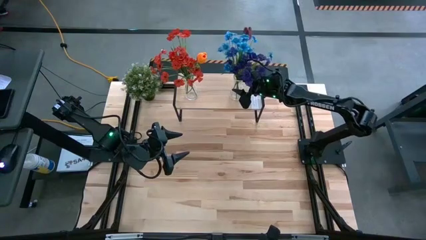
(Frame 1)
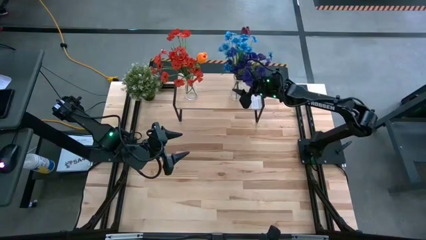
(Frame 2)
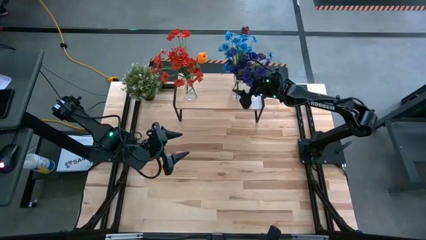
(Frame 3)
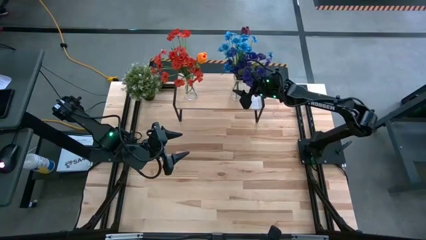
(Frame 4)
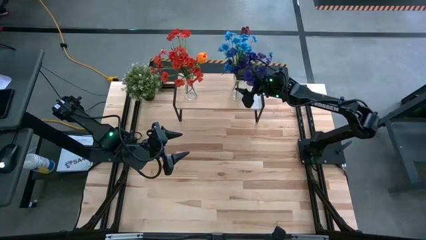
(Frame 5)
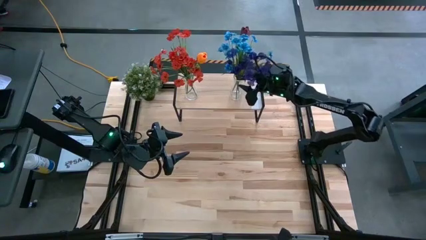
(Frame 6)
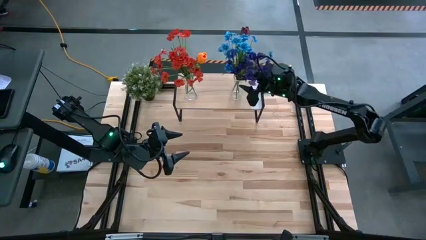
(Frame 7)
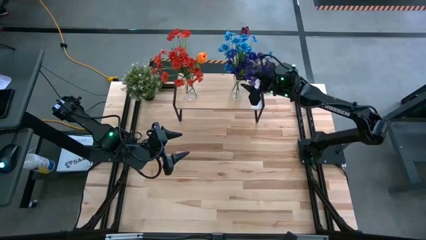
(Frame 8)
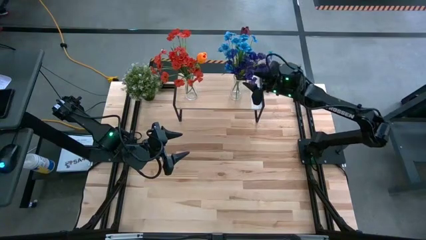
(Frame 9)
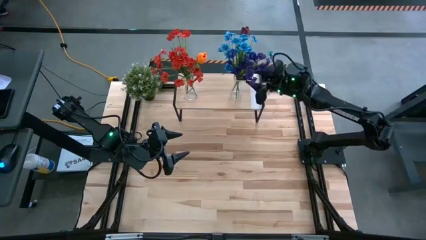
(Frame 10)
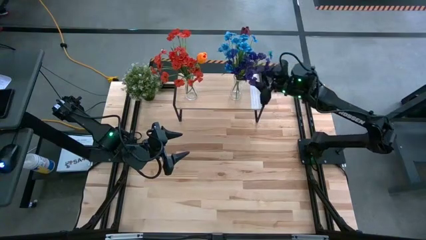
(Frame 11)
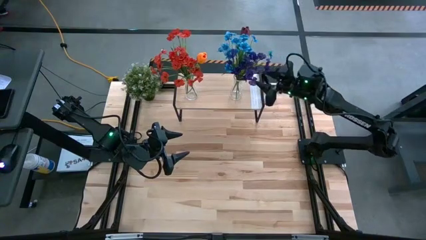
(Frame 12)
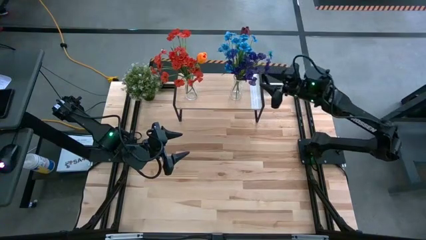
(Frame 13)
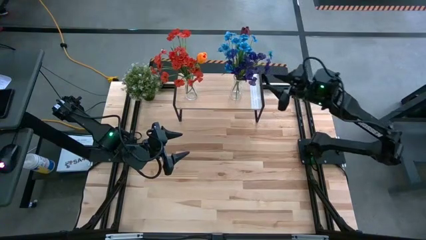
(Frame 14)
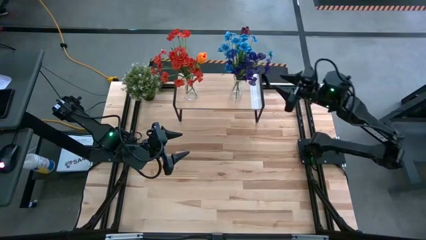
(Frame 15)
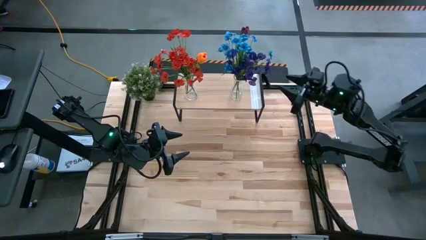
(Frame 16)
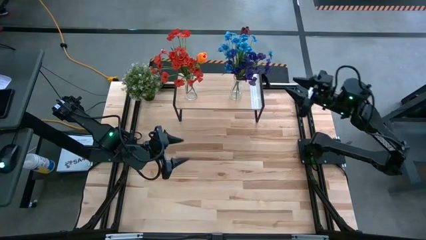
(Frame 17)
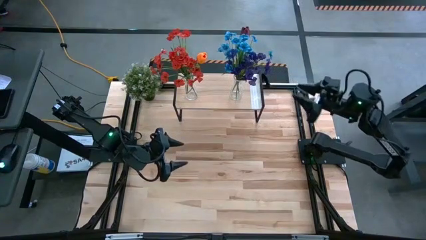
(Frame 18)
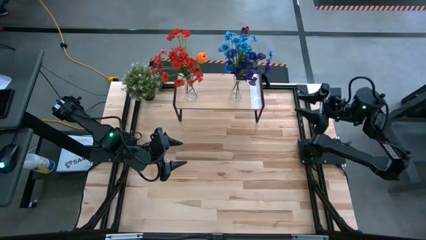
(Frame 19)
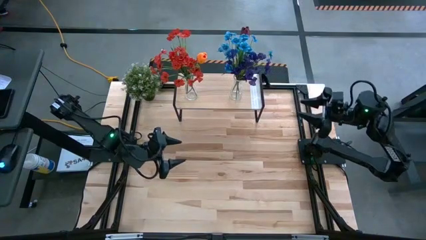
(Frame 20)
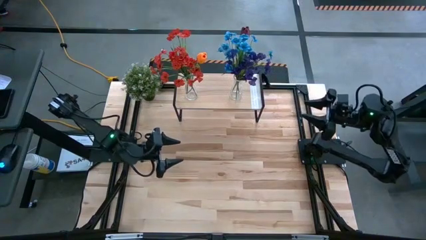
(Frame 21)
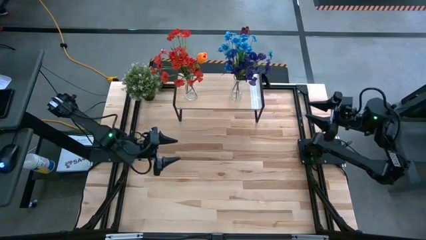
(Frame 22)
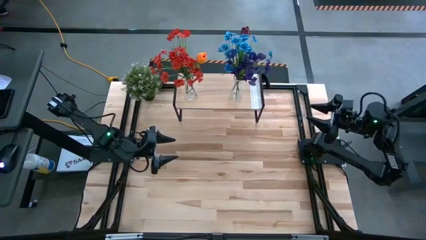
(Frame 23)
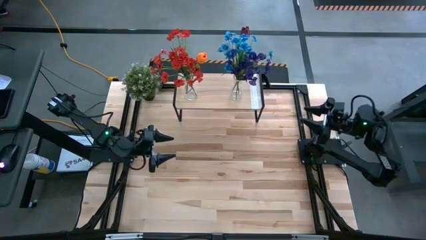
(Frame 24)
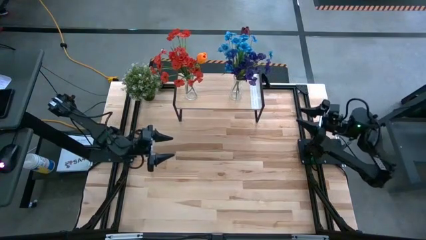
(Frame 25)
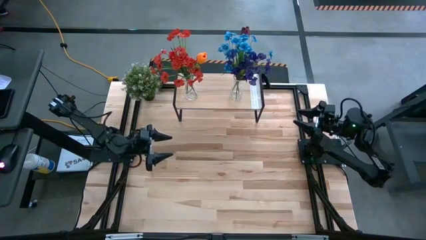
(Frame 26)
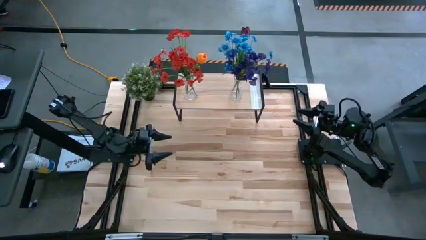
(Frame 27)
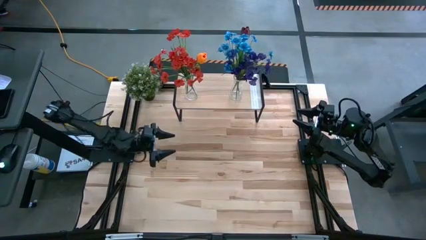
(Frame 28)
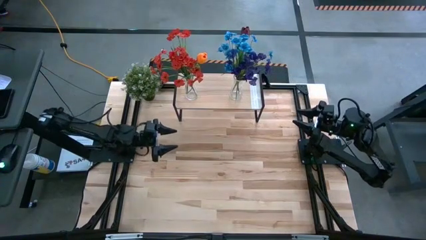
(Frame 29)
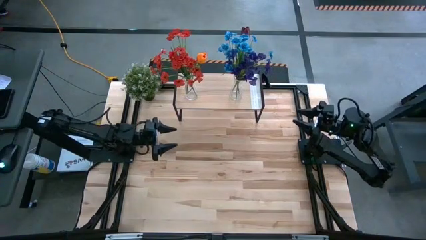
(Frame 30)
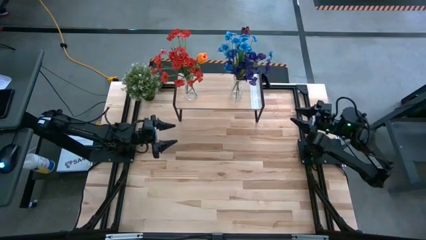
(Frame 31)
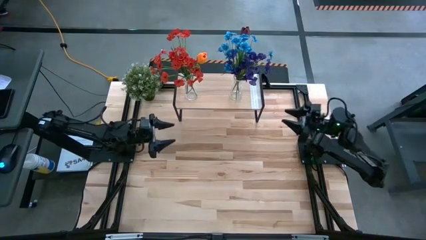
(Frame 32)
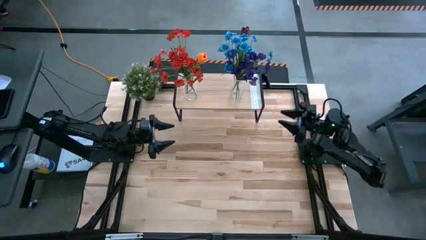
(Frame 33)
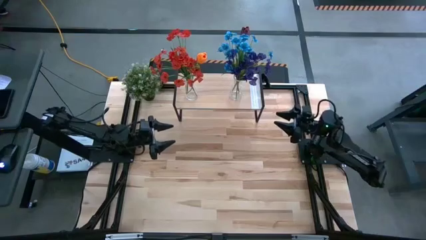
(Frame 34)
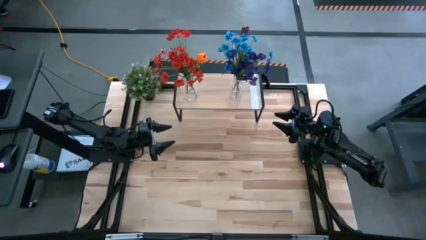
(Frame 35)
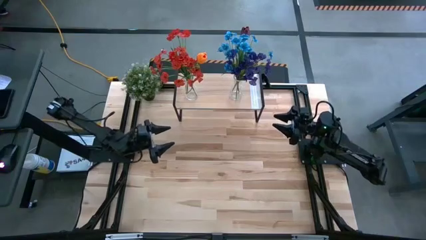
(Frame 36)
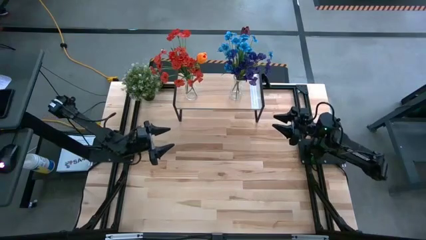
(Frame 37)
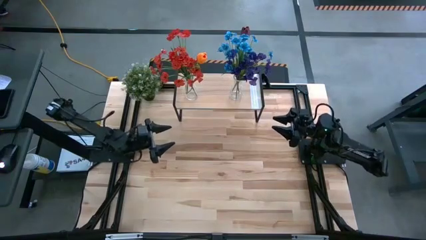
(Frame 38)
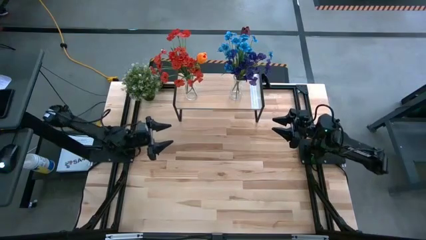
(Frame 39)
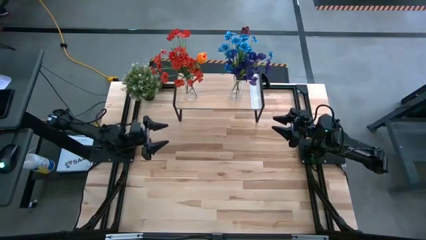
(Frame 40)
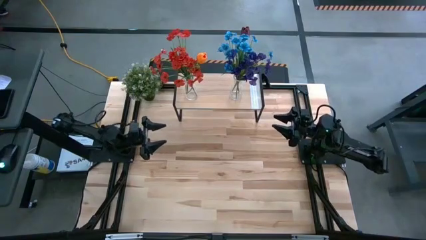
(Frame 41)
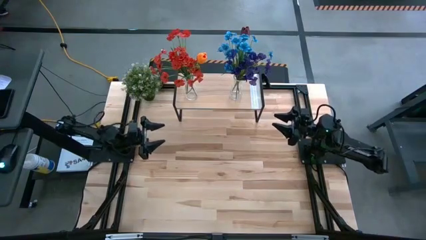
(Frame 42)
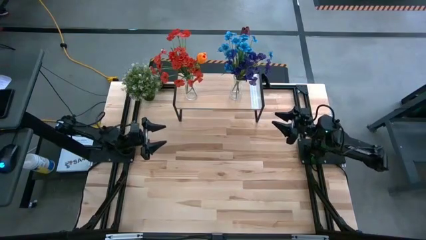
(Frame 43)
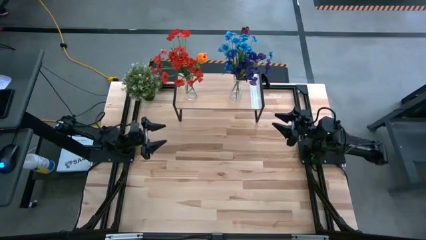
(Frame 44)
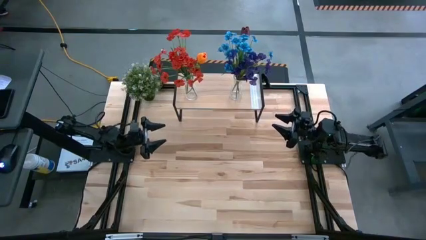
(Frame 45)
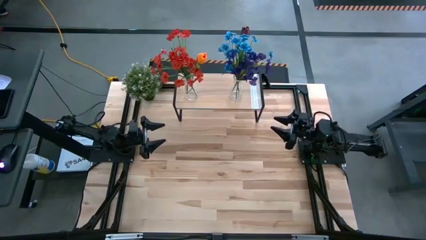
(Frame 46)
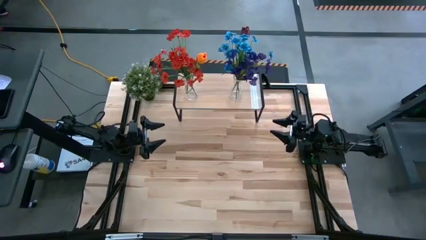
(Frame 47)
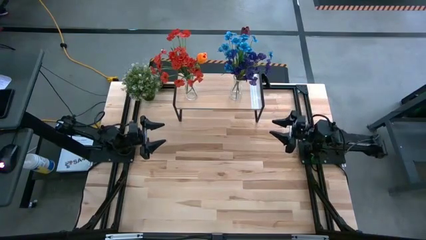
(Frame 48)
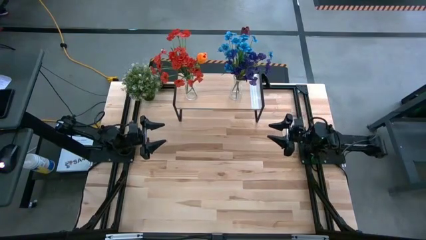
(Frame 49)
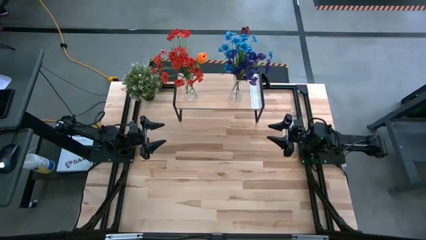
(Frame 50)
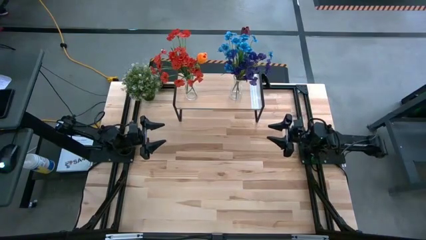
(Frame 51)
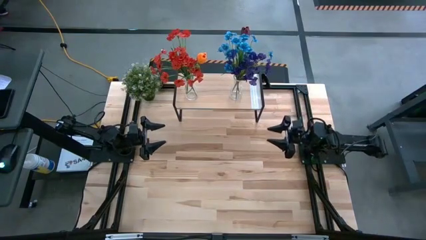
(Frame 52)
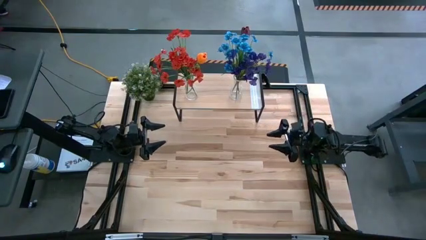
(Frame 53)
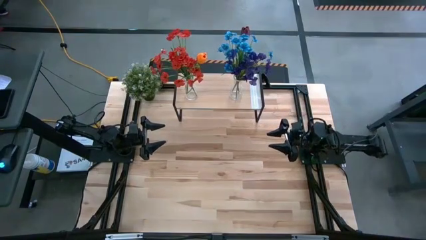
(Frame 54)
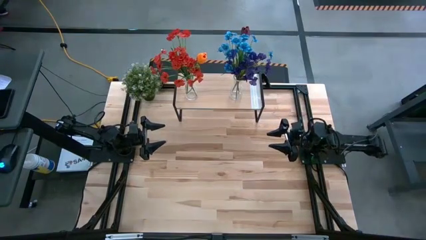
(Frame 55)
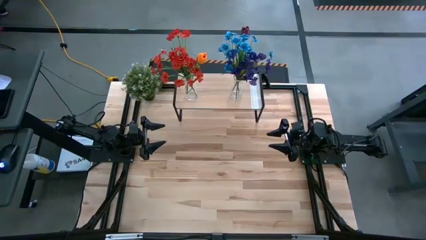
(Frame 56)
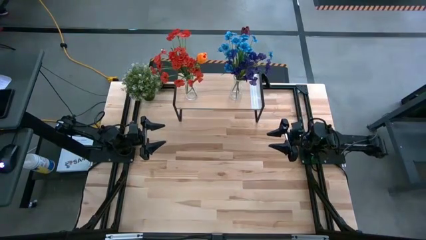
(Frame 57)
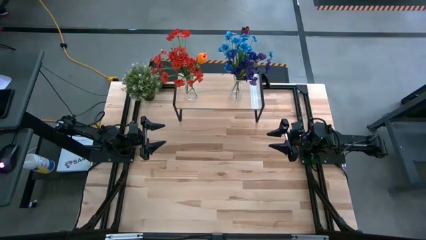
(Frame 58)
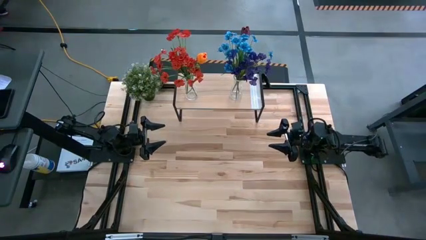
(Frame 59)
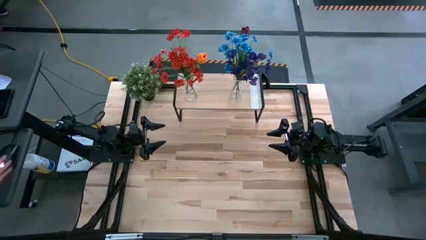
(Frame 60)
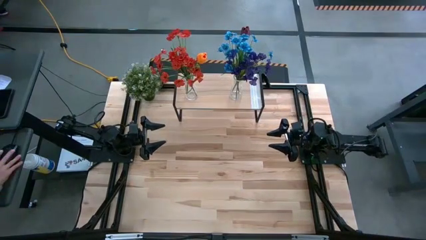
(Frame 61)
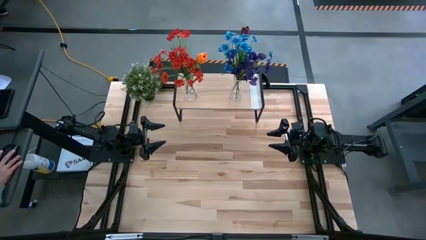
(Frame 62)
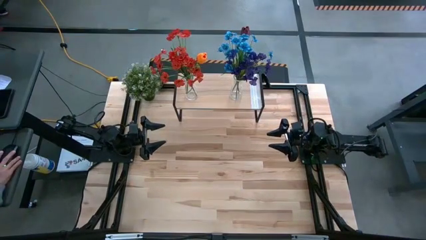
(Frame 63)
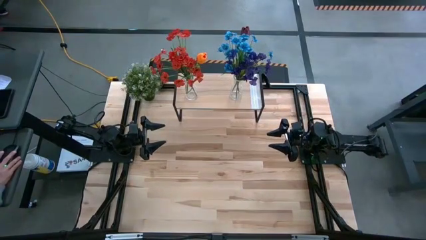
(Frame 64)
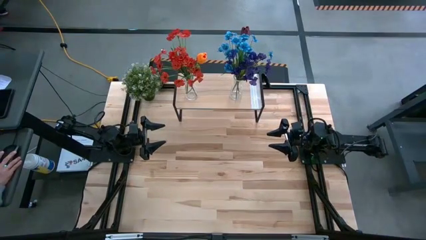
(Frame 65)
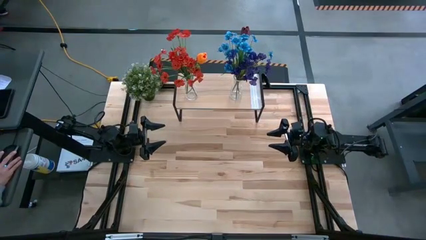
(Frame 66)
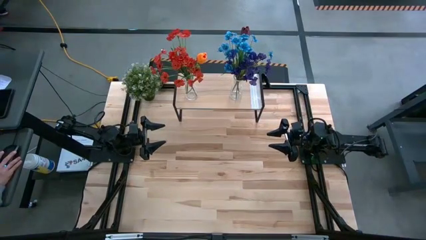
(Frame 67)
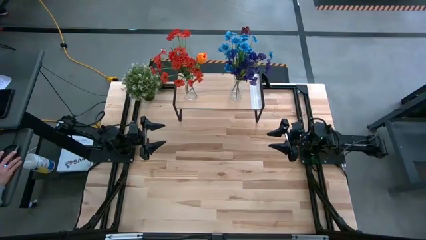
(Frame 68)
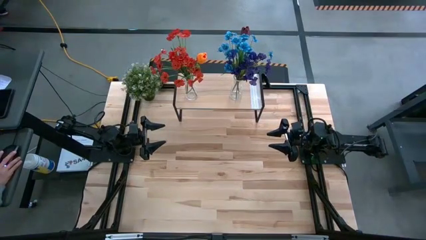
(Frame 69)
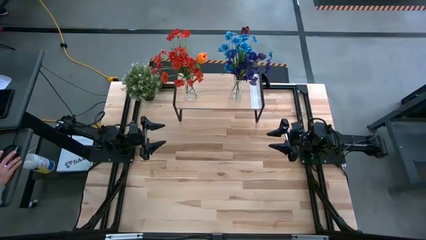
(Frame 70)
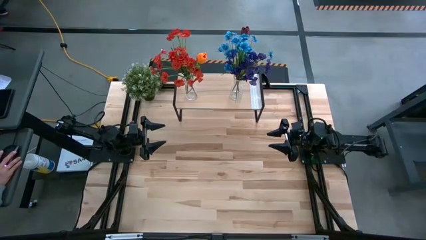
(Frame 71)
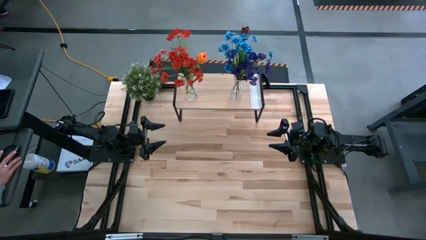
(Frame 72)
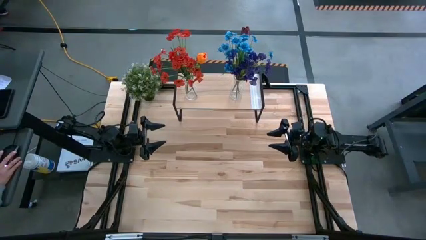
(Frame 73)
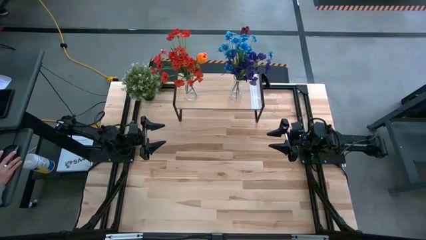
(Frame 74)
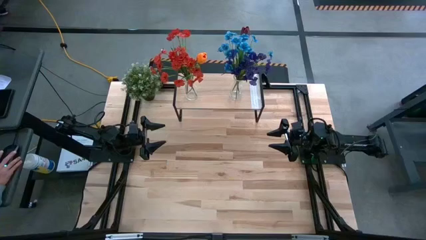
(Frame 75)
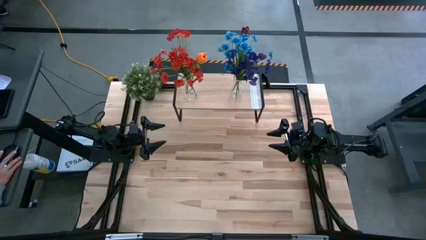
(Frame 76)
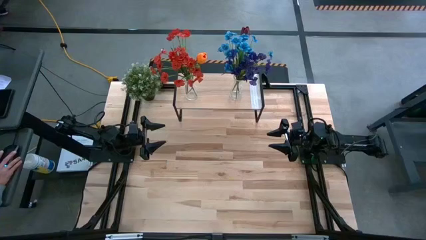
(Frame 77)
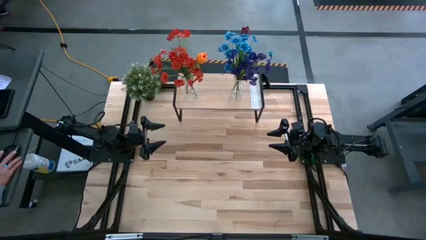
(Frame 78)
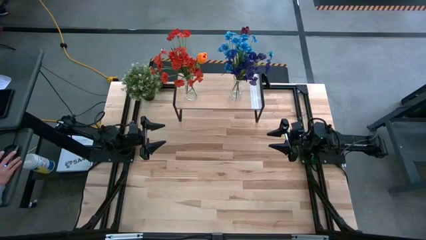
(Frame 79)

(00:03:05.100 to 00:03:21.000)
Task: Pick and place flowers into a vace then onto a shelf
Return to Home Position
